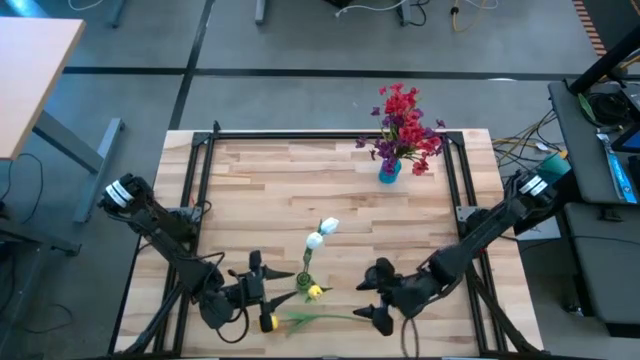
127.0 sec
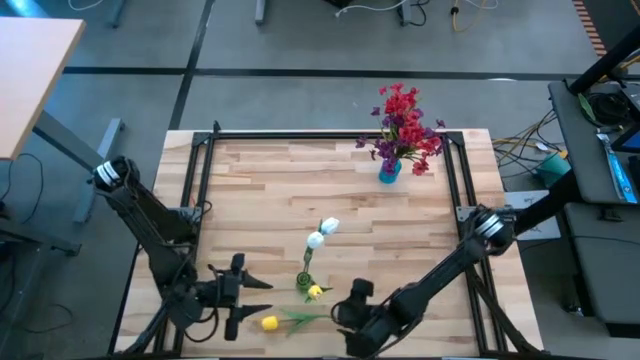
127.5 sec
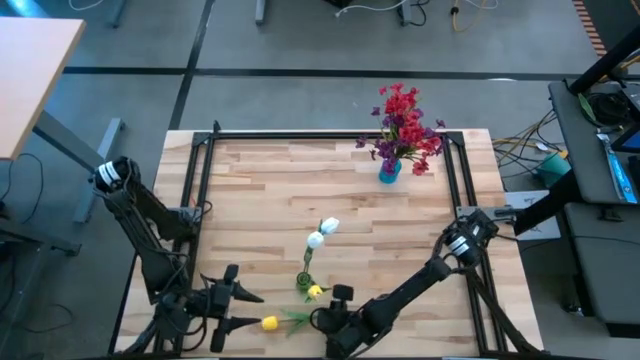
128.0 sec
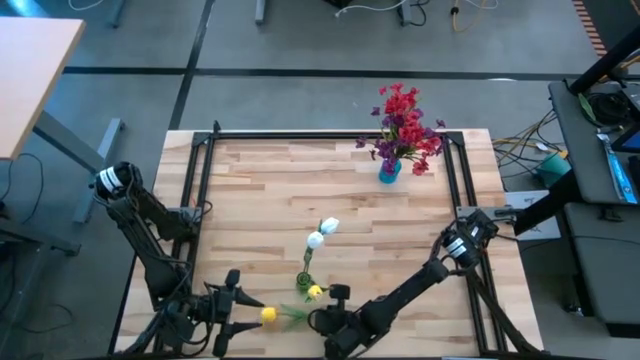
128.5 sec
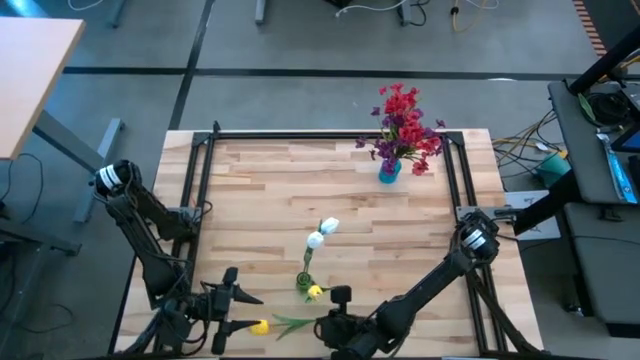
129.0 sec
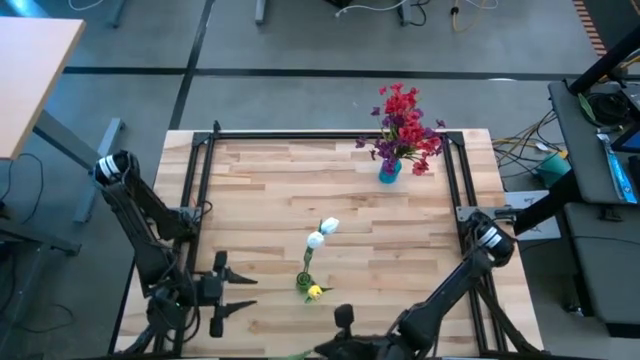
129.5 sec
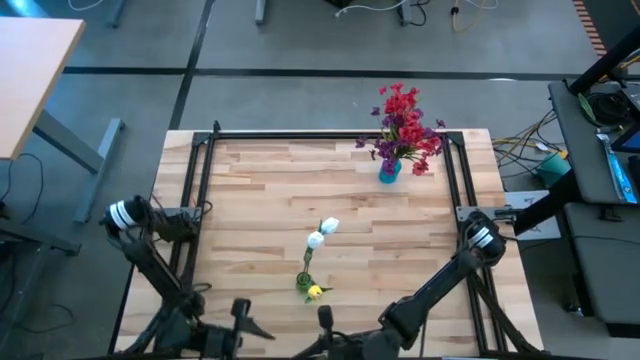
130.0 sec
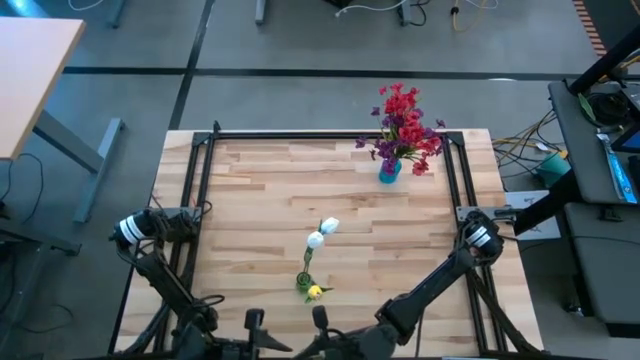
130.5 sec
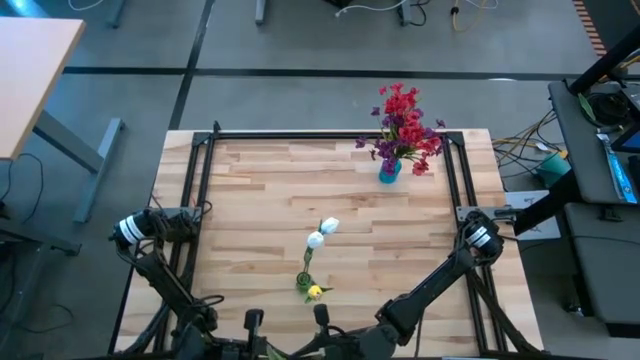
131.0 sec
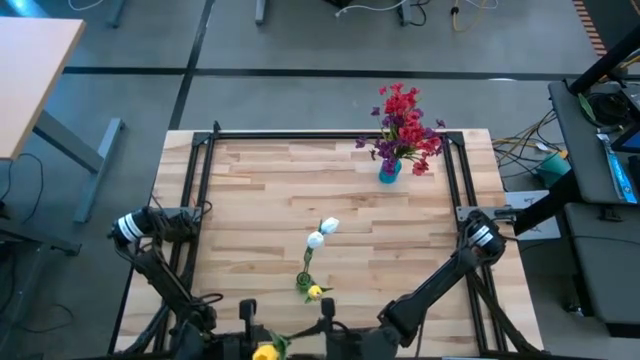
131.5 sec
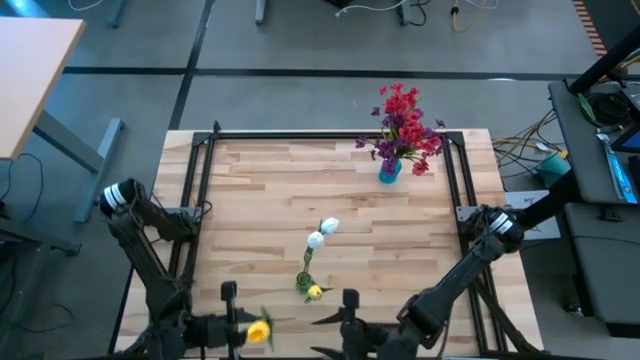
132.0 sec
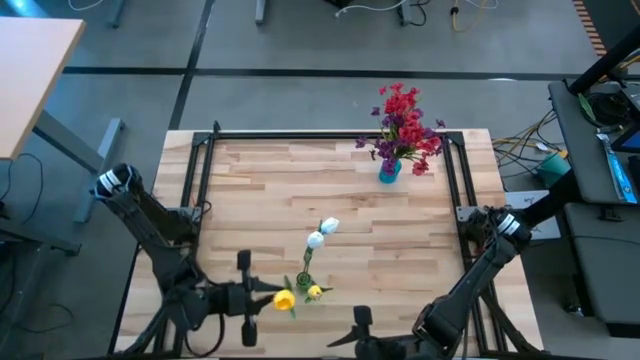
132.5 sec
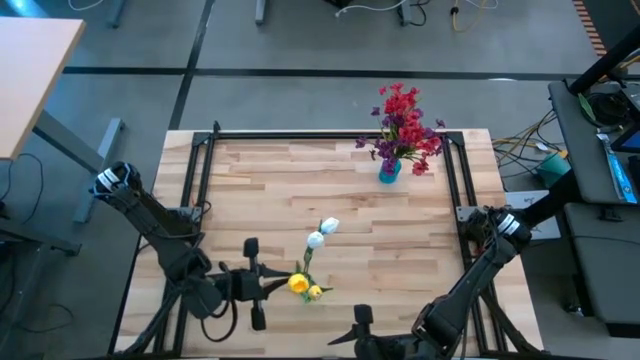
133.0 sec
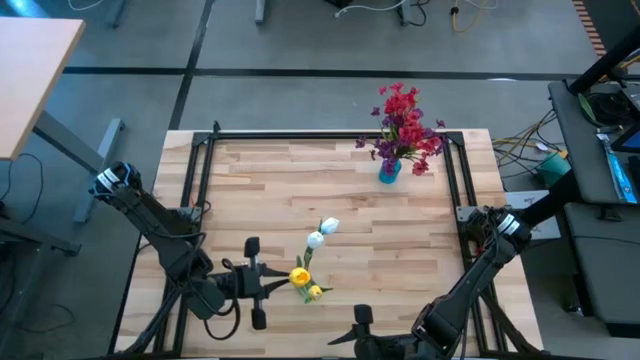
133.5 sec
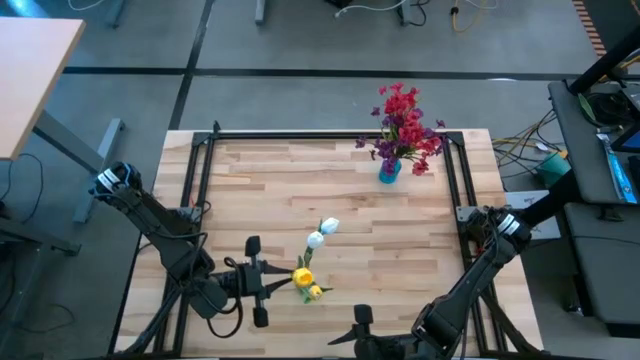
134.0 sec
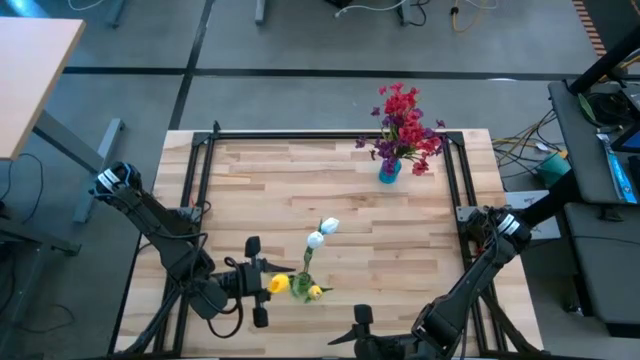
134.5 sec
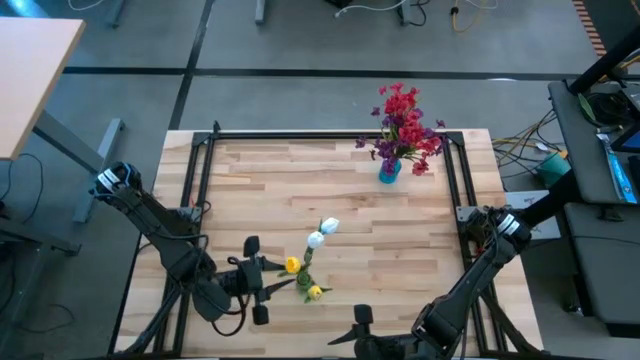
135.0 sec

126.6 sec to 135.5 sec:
Task: Sort flowers into vase by color
Put the yellow flower into the green vase

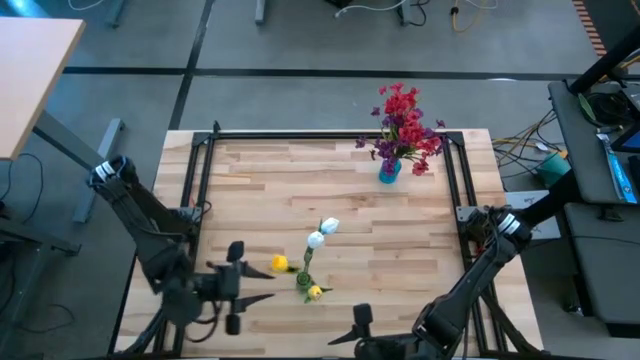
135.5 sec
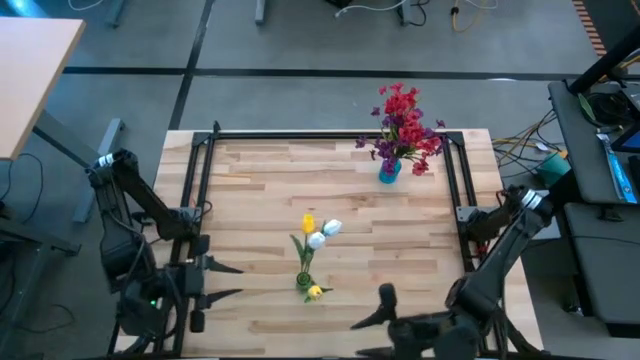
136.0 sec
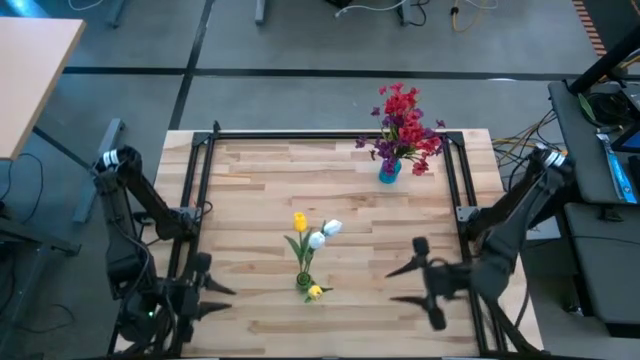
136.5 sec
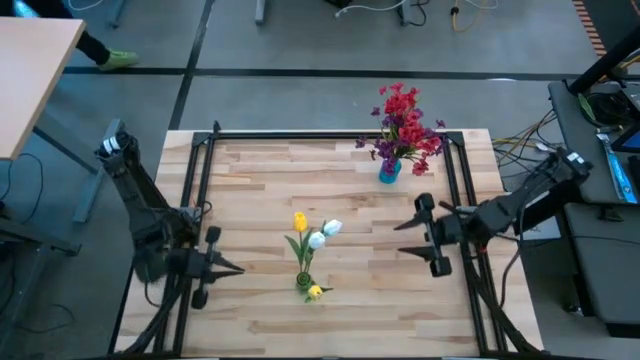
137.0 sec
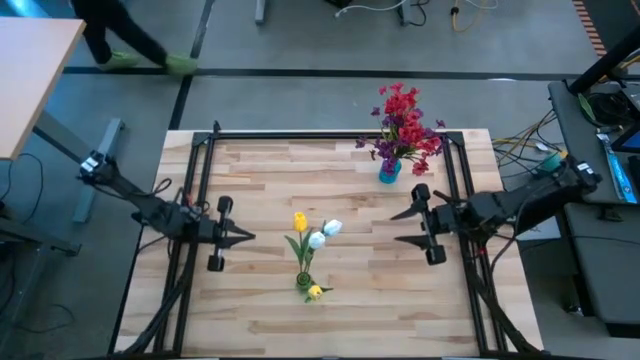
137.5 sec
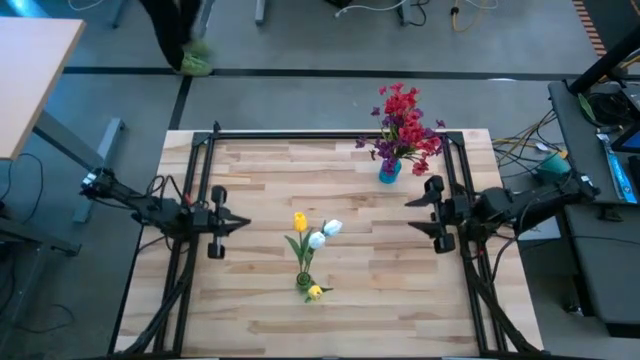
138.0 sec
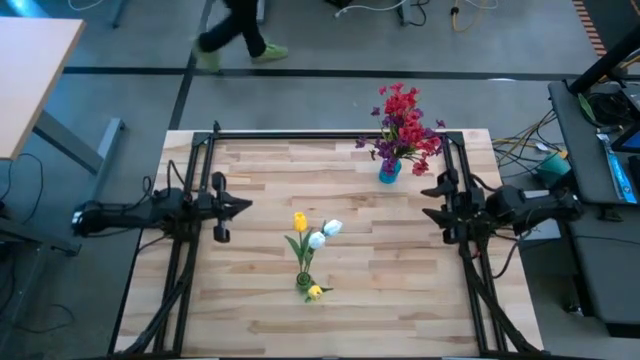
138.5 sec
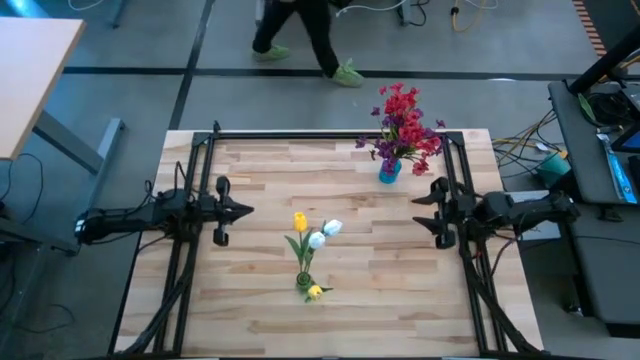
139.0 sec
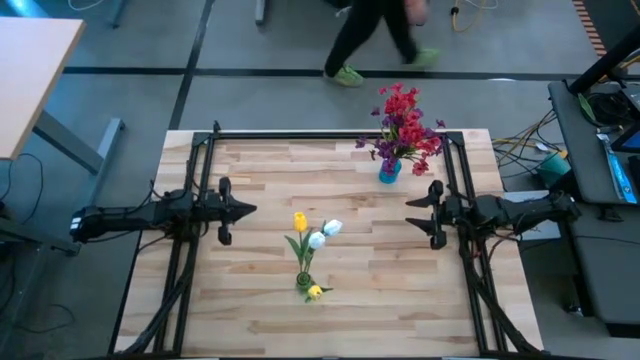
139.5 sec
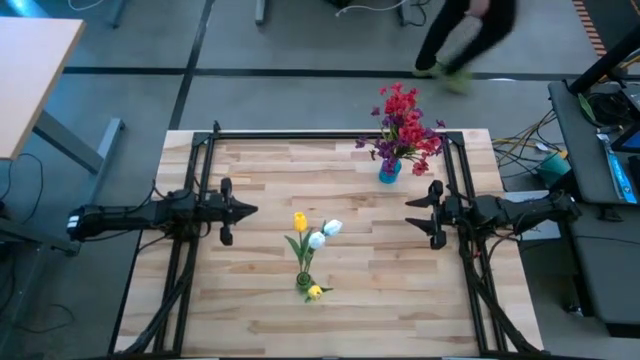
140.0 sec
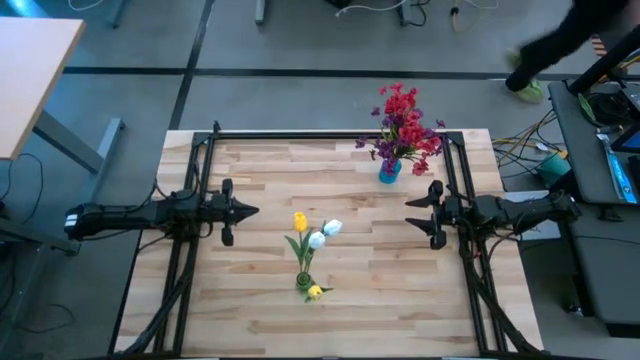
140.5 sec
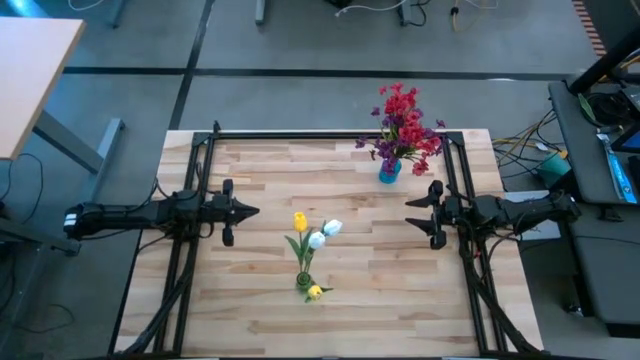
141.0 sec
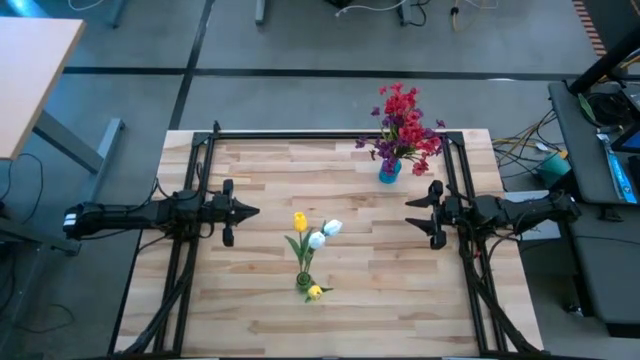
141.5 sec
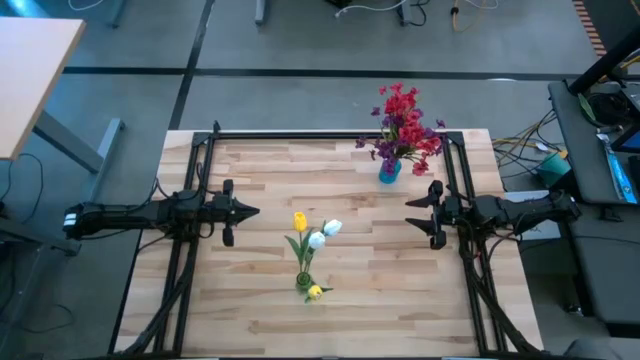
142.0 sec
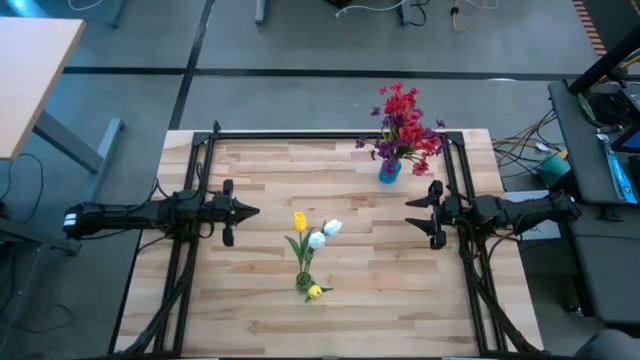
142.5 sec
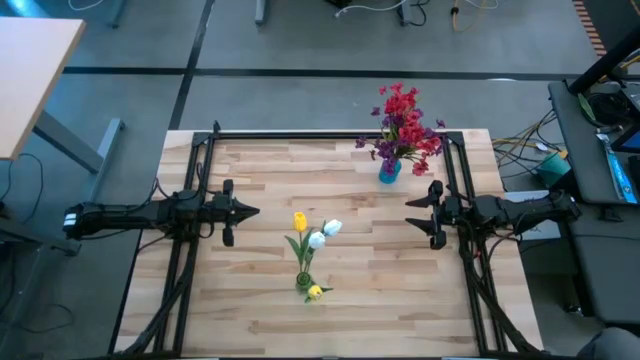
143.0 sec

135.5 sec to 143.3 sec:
Return to Home Position

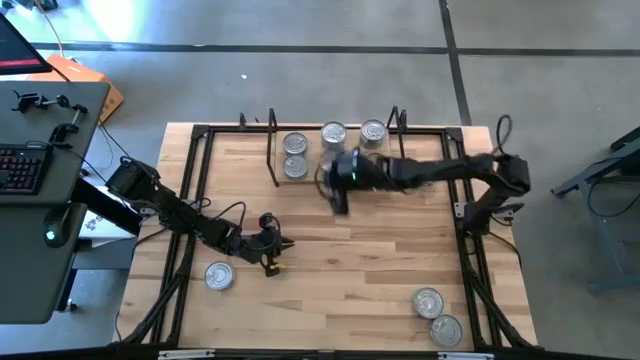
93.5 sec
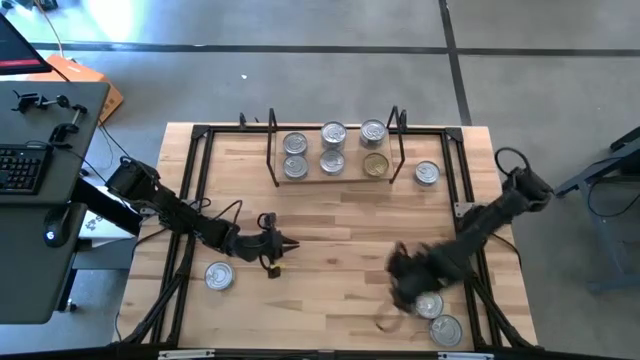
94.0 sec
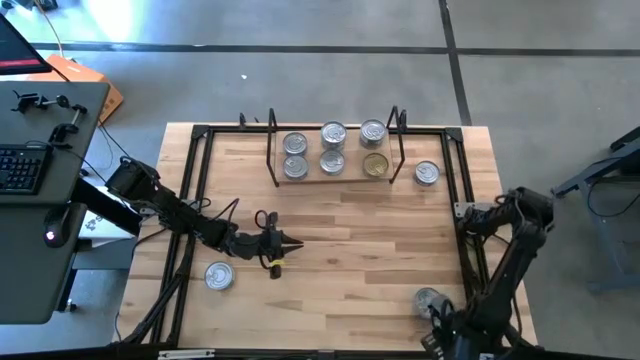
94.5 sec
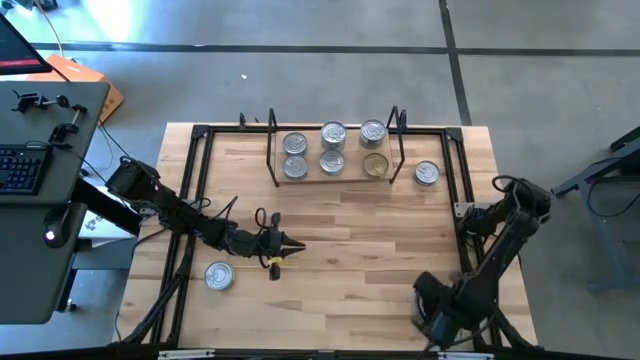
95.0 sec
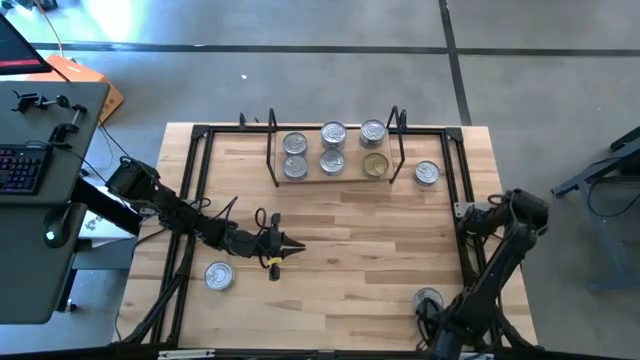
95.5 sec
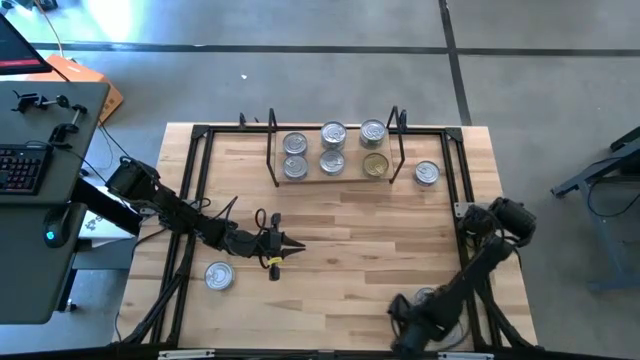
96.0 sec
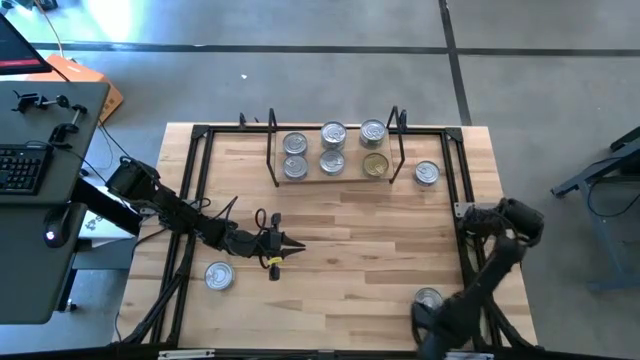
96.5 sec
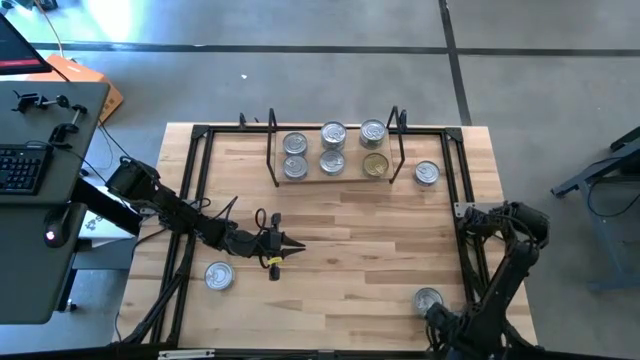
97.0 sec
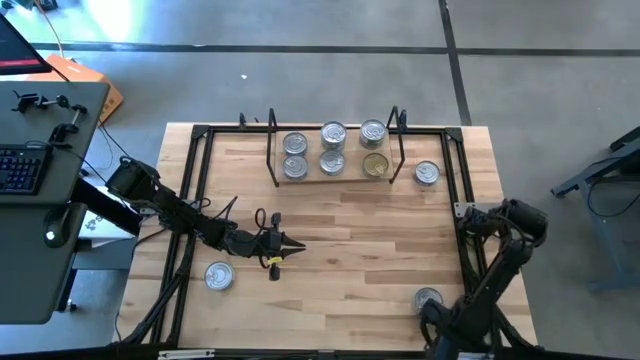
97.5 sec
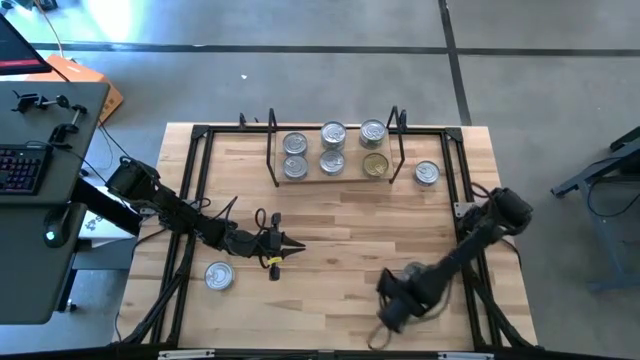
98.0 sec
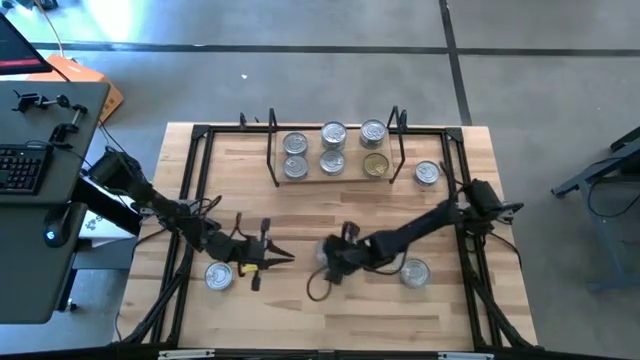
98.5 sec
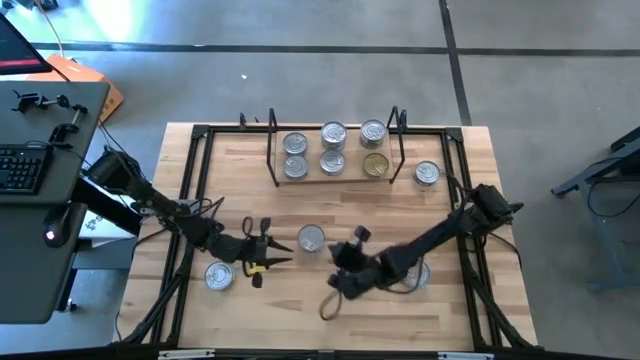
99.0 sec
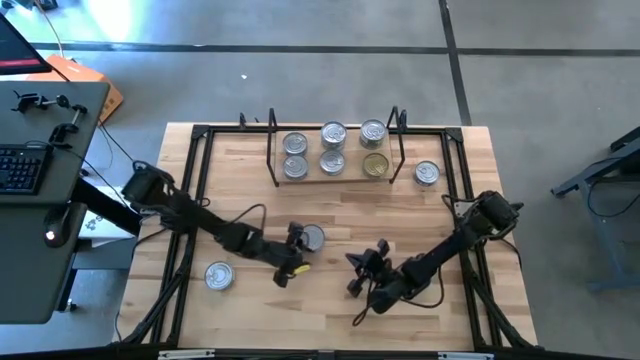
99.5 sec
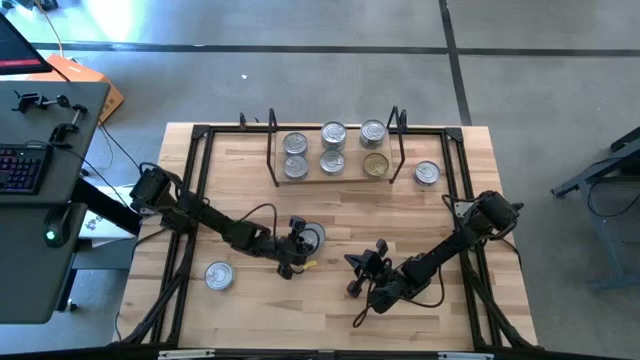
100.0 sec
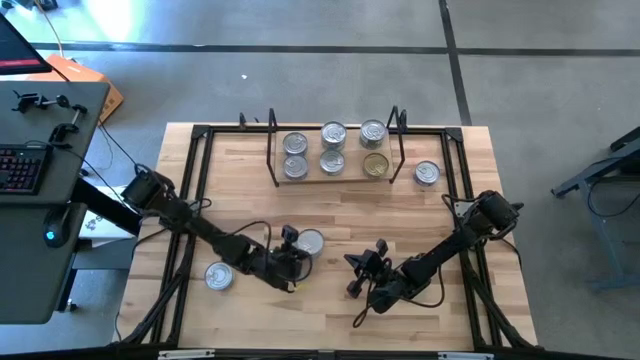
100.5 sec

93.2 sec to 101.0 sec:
Task: Stack canned seafood by type on shelf
Stack the blue tuna can on top of the blue tuna can on the shelf
